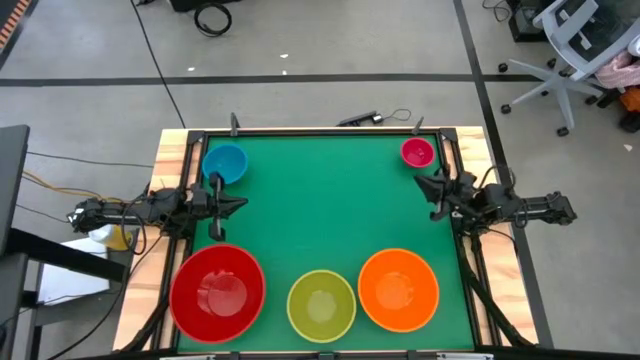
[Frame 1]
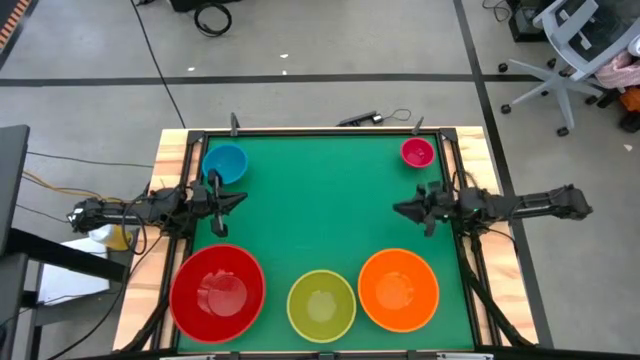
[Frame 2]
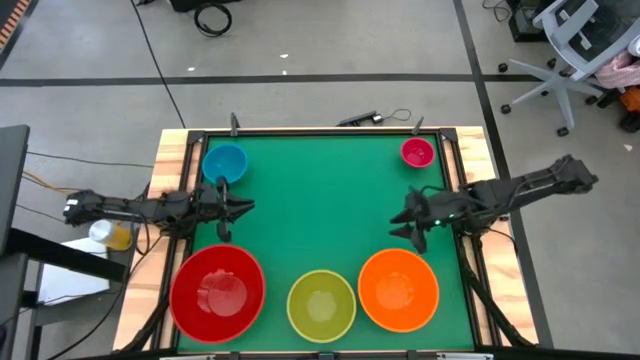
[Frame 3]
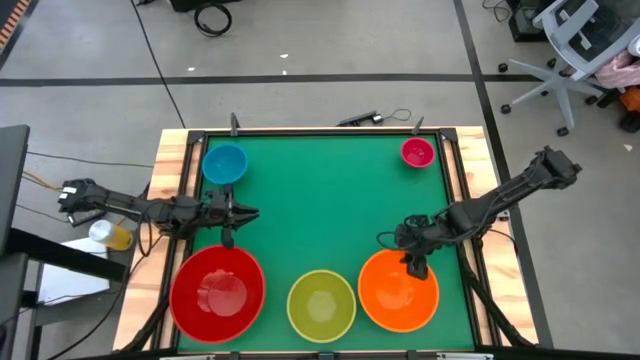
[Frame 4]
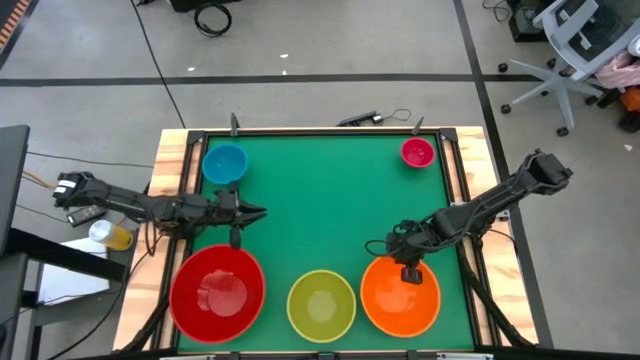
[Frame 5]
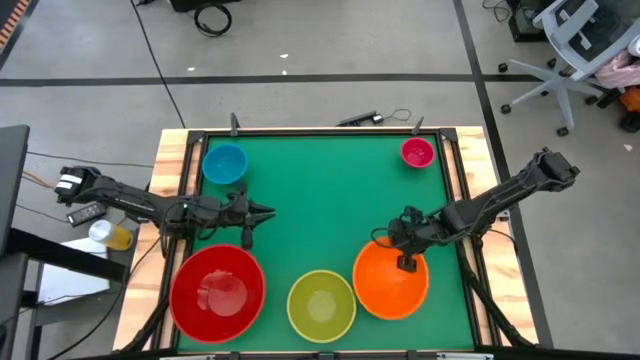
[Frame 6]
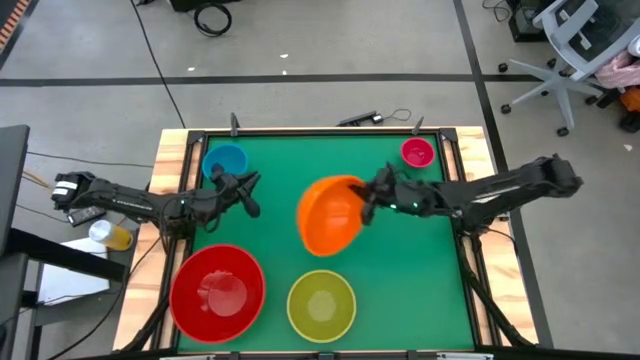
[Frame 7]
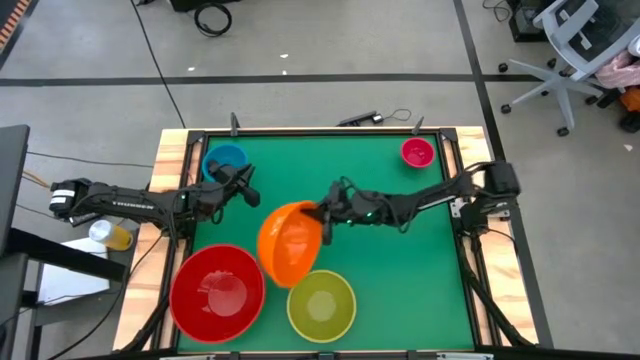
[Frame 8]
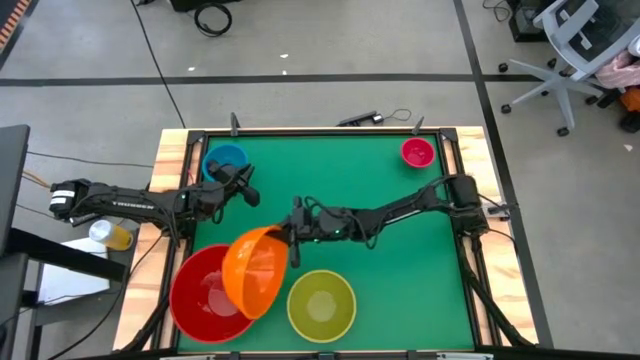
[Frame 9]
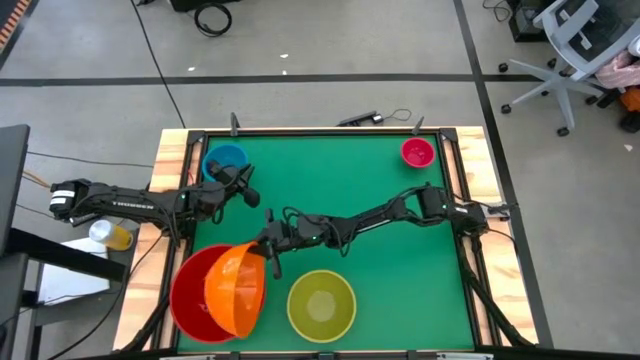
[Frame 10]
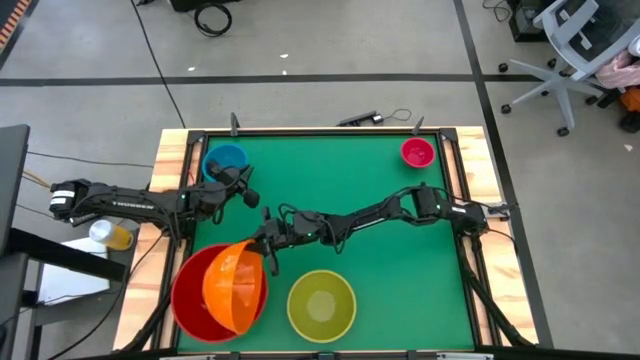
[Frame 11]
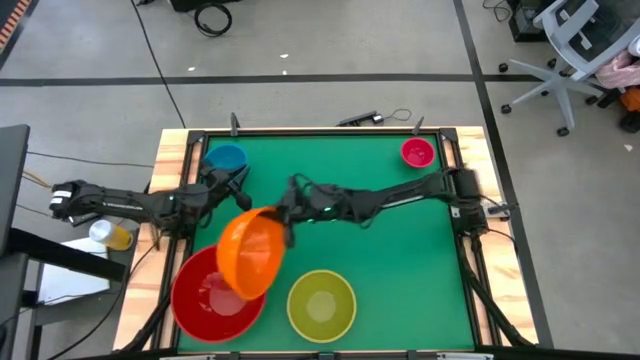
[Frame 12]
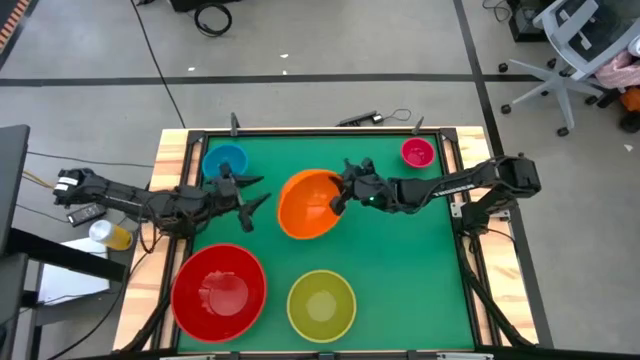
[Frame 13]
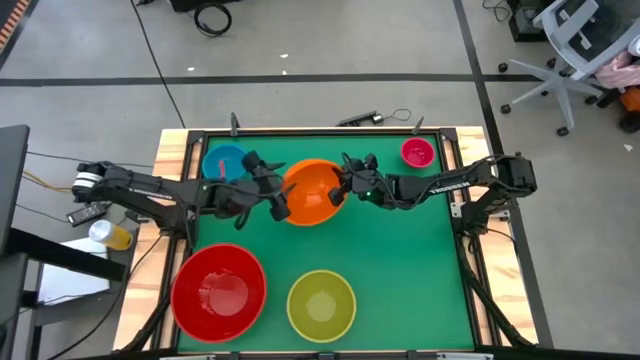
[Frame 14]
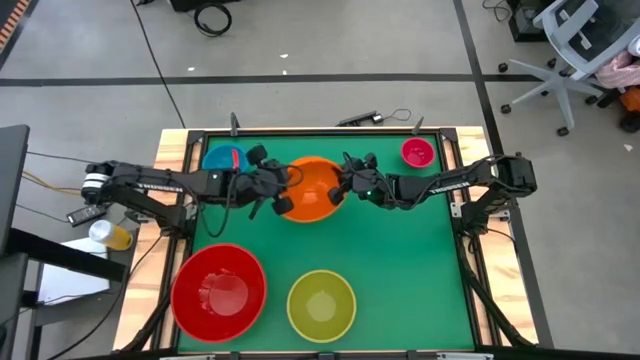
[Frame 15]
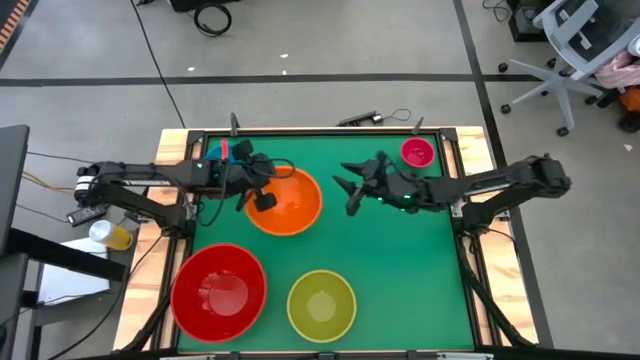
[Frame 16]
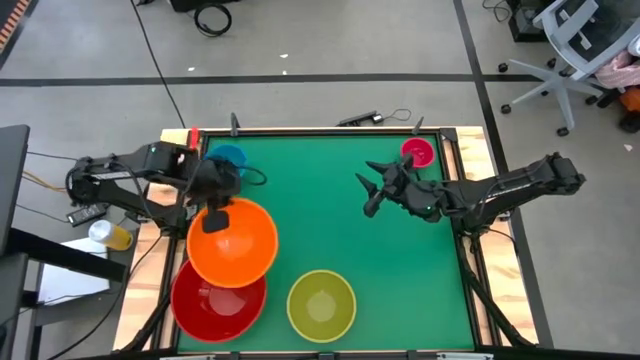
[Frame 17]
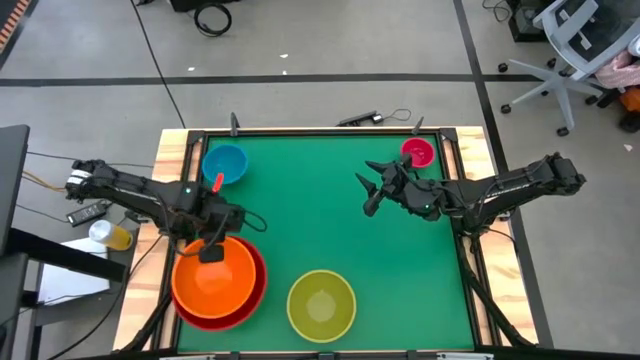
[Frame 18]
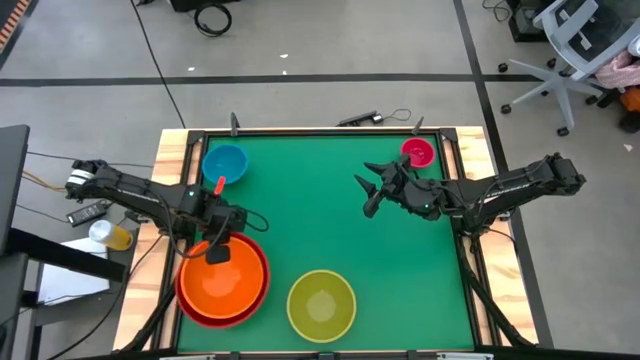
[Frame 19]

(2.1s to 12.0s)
Stack the orange bowl on top of the red bowl

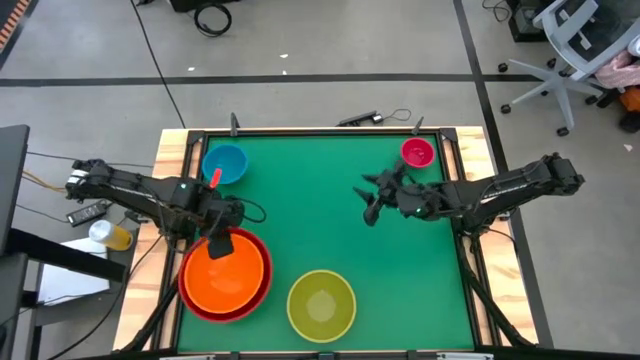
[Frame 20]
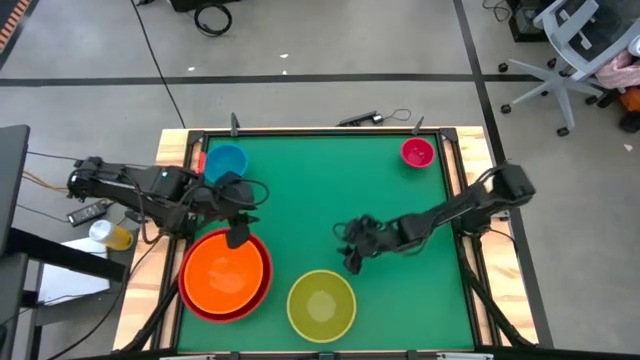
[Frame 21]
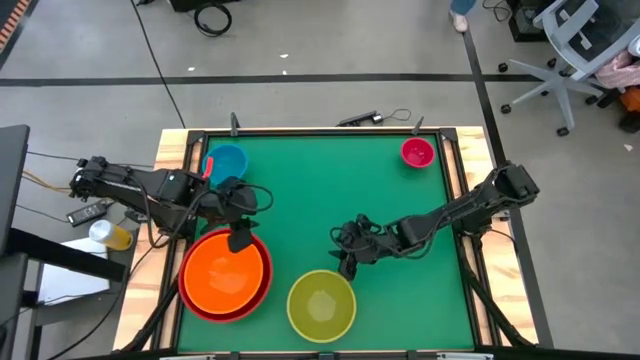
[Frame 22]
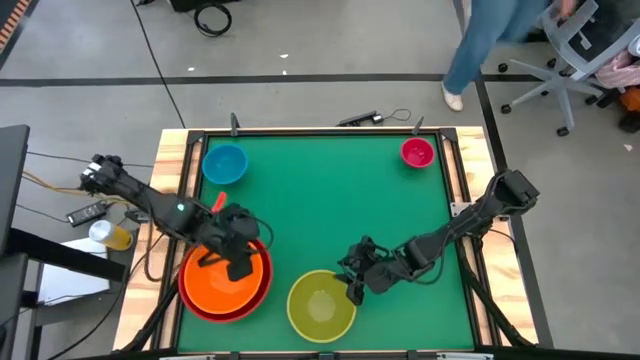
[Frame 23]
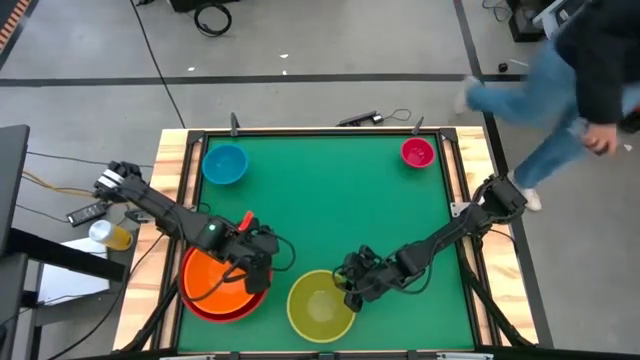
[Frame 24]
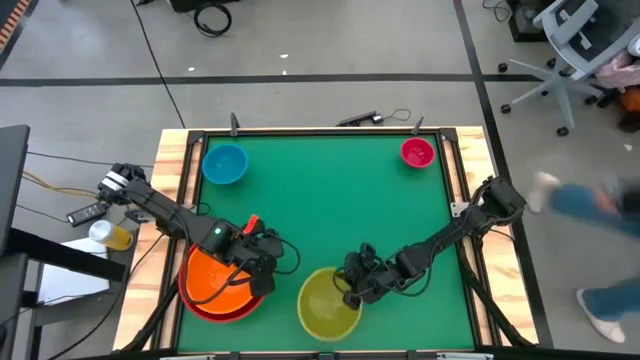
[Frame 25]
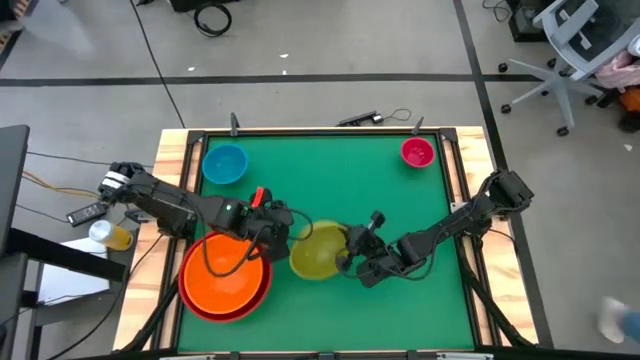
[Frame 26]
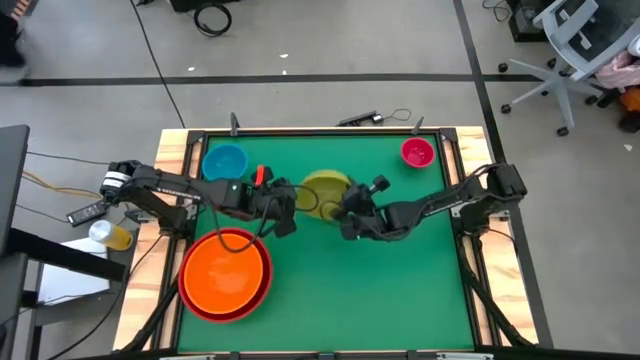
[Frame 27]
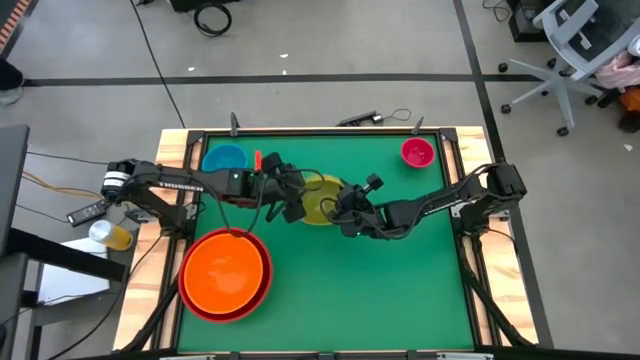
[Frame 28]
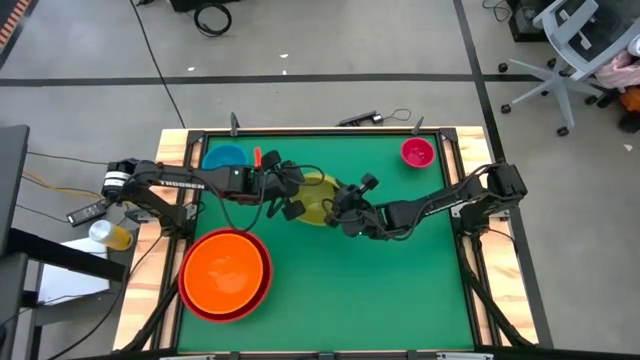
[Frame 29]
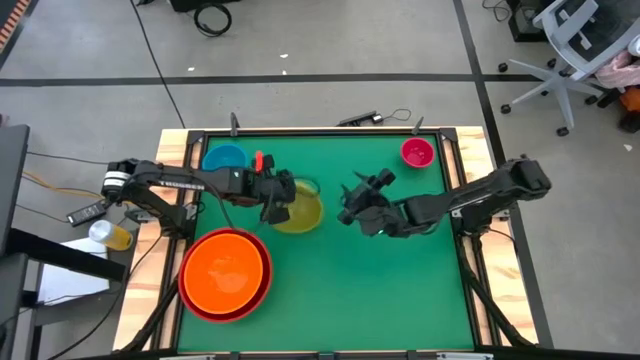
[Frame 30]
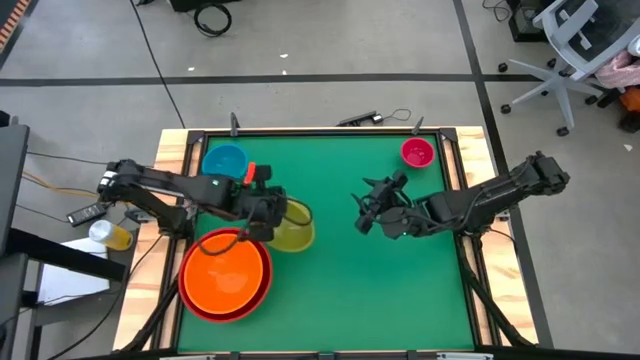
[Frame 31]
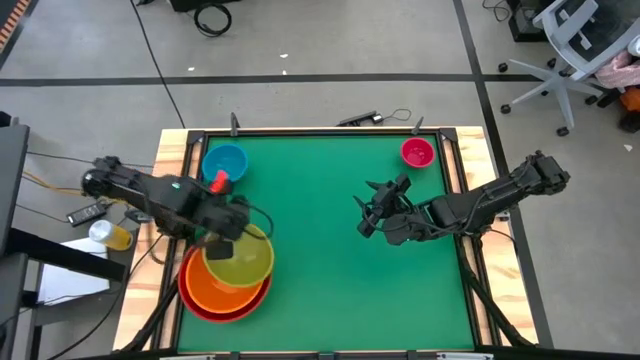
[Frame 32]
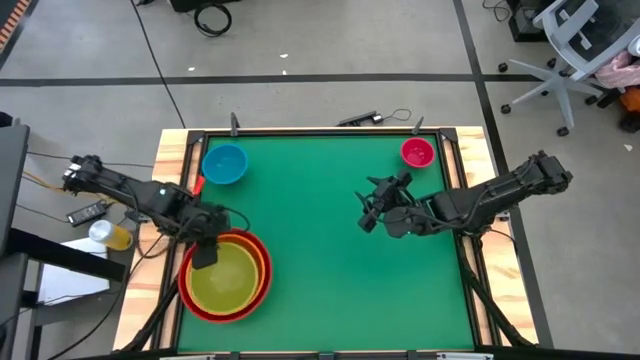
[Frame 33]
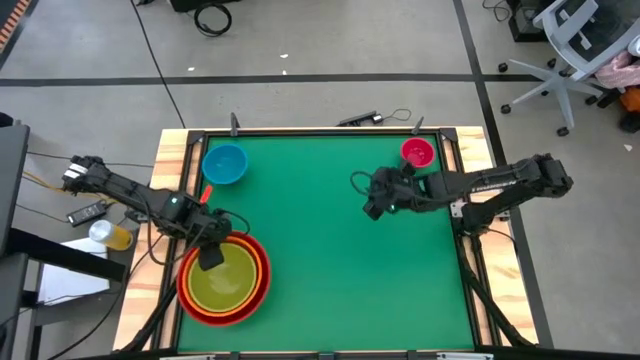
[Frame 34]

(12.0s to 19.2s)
Stack the green bowl on top of the orange bowl

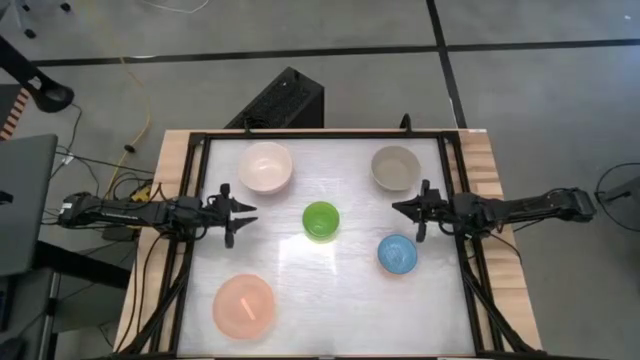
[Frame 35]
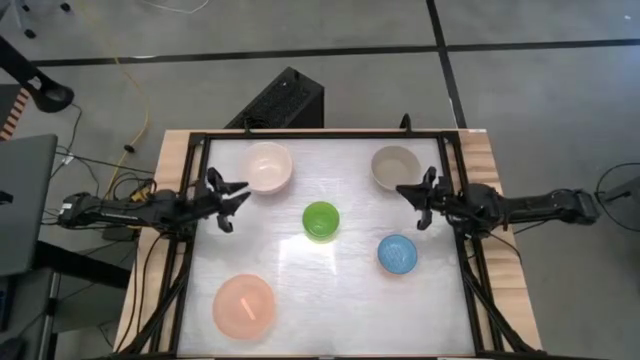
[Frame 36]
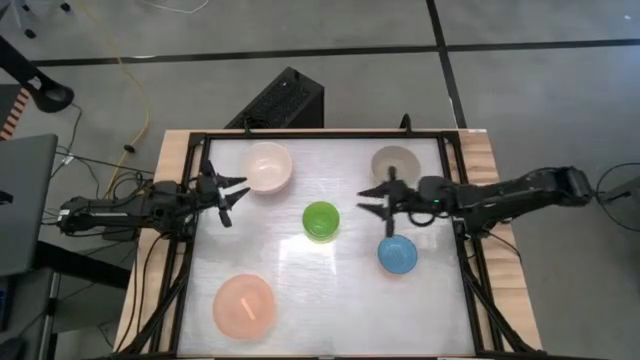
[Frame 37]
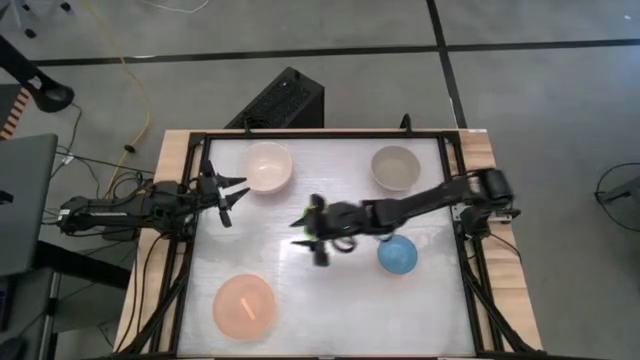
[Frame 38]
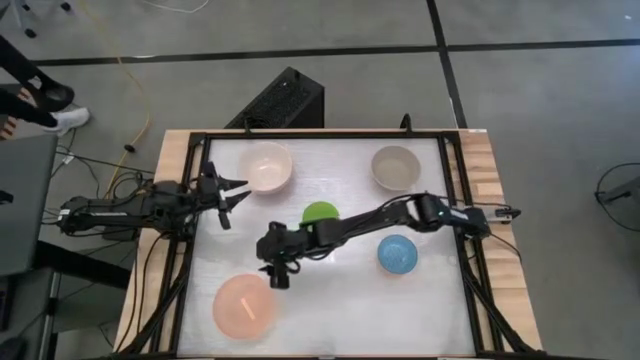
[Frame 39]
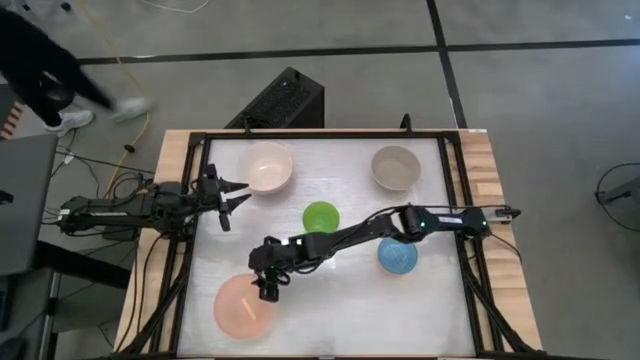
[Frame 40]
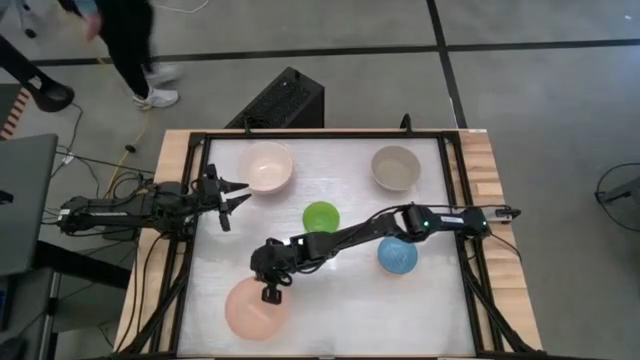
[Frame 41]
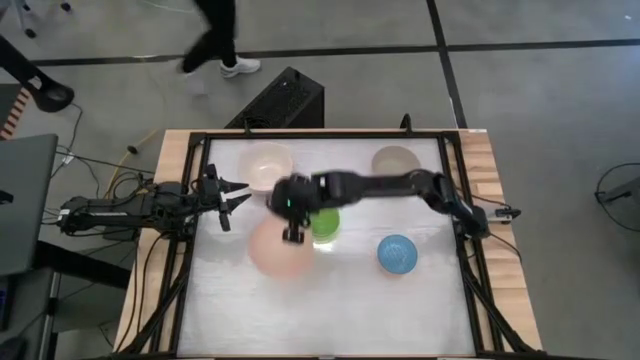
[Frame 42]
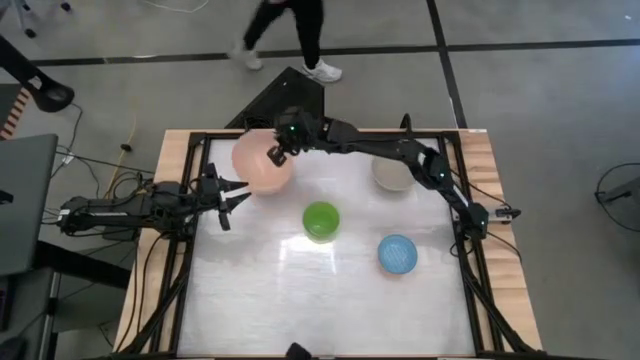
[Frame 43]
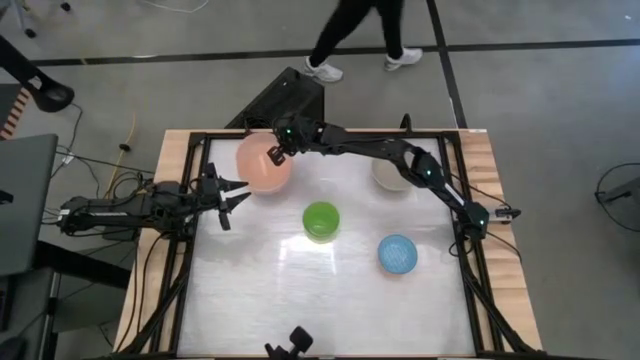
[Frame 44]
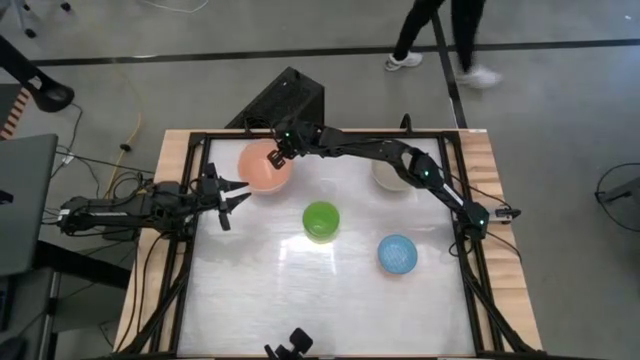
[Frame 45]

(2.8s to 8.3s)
Stack the orange bowl on top of the white bowl
